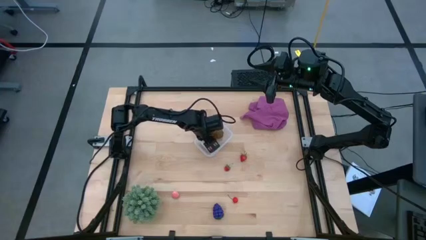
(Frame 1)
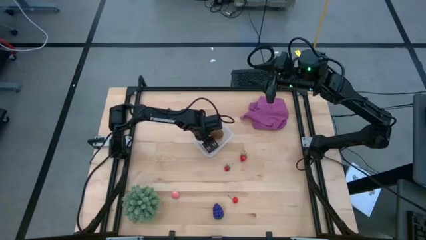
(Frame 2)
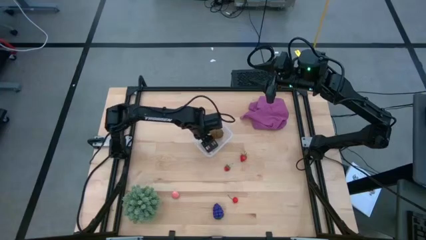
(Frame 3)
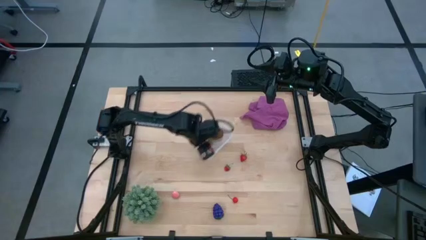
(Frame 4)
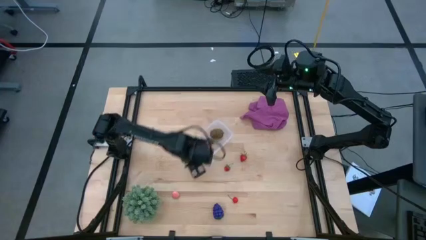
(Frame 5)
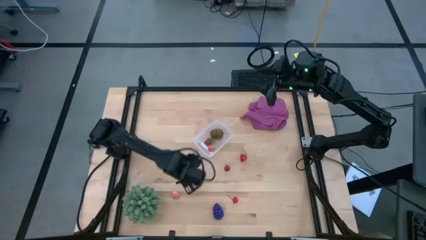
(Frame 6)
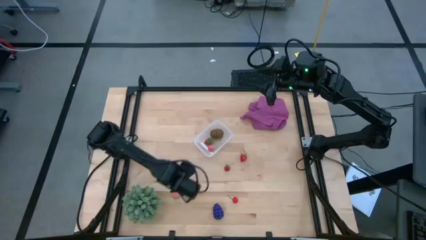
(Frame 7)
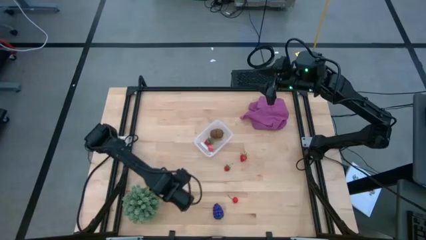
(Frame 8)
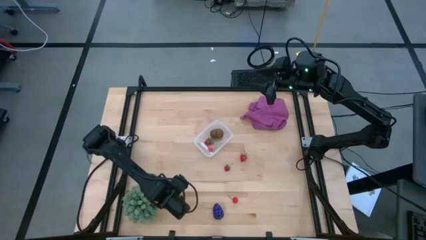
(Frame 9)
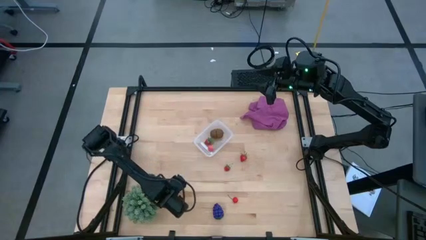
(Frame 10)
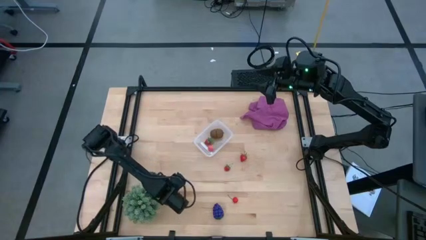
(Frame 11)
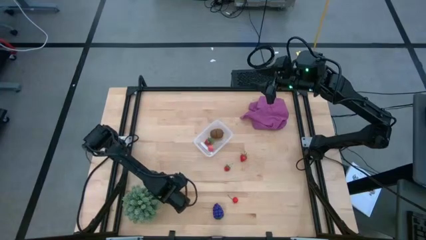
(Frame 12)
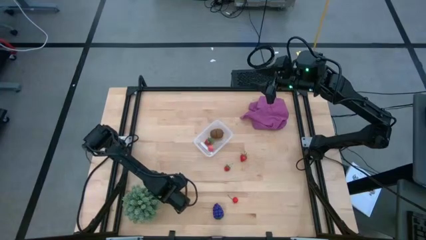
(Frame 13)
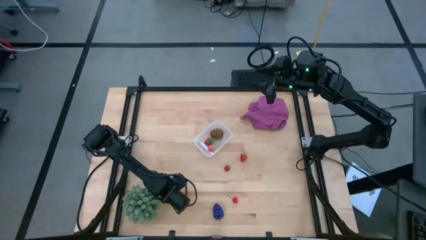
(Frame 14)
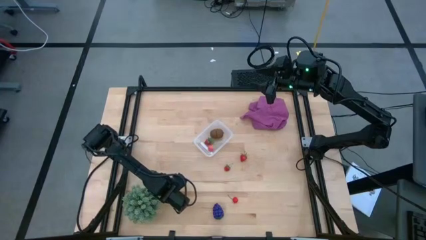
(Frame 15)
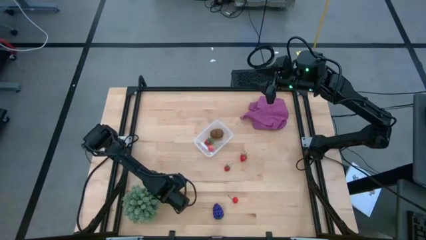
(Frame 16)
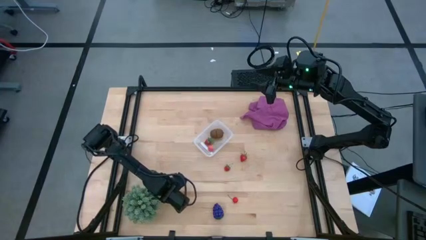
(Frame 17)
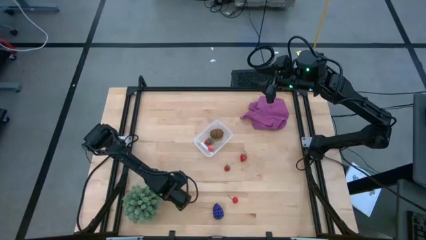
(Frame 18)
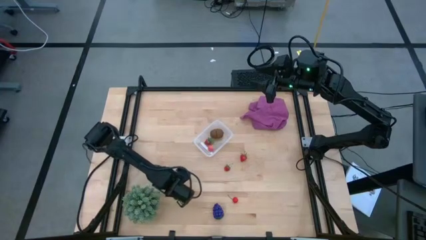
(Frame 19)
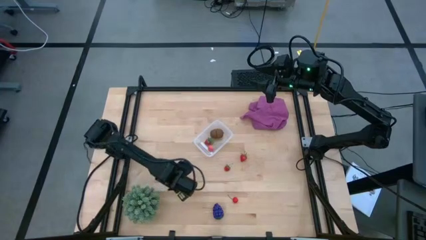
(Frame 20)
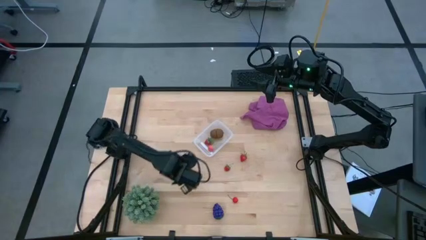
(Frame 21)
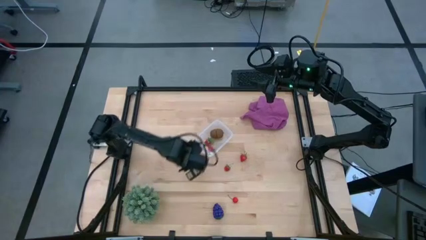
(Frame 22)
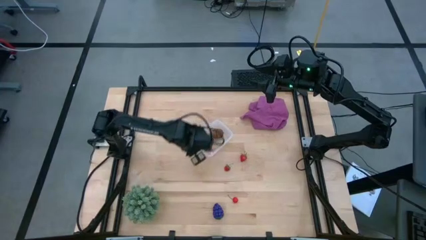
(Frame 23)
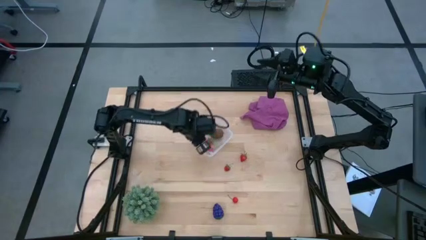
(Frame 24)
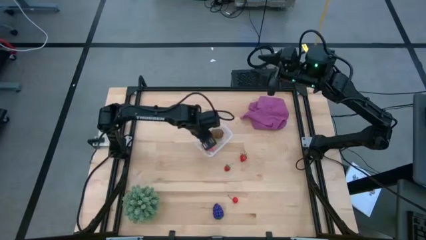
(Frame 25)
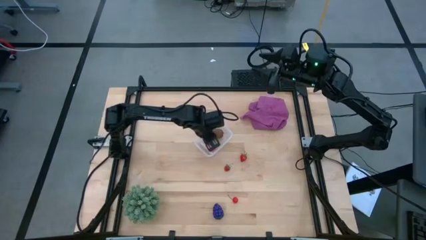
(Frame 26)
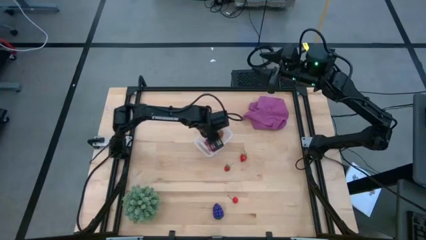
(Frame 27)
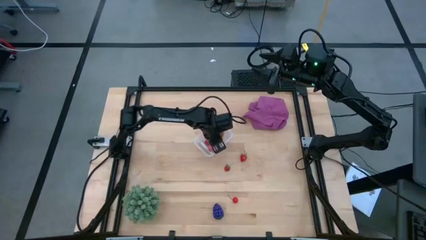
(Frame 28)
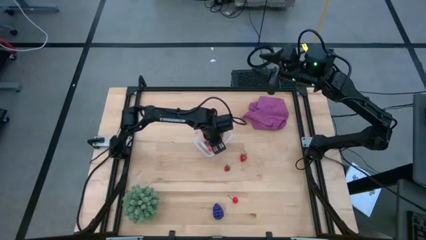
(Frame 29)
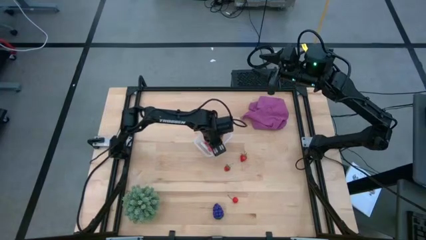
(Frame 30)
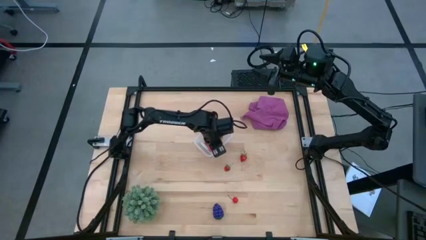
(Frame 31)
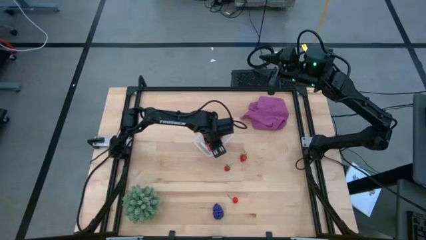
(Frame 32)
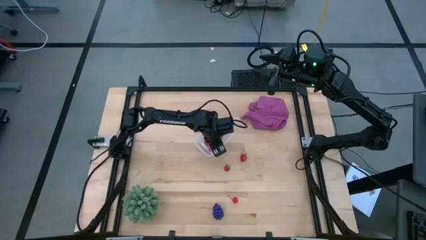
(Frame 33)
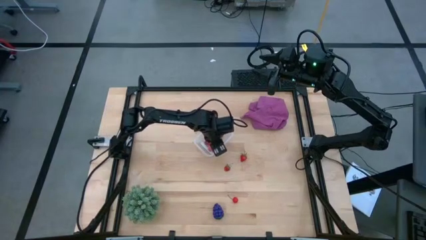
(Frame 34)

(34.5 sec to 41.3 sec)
Task: Pick and placing Produce into tupperware
Put the peach into the transparent bin

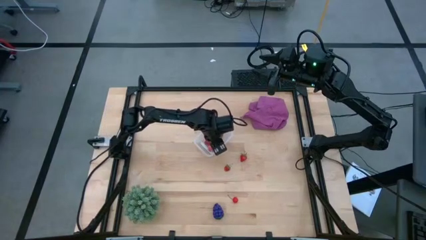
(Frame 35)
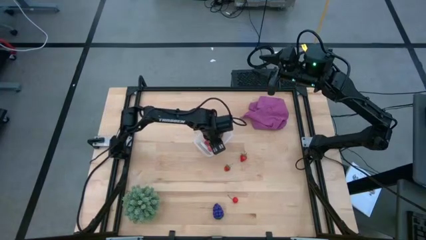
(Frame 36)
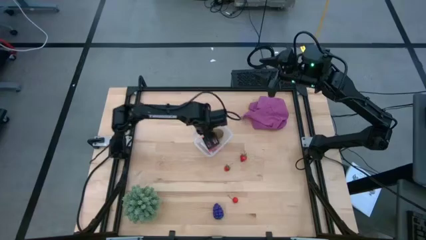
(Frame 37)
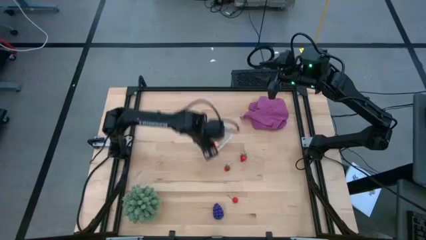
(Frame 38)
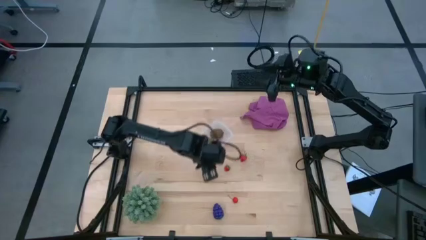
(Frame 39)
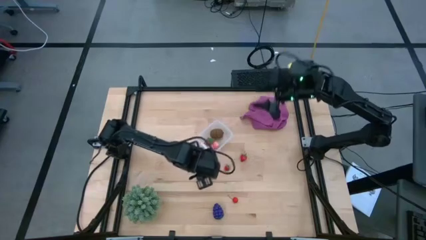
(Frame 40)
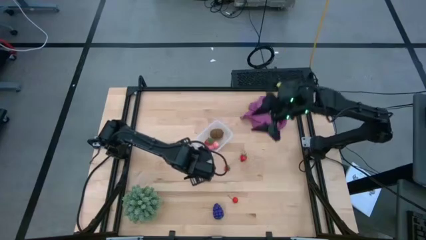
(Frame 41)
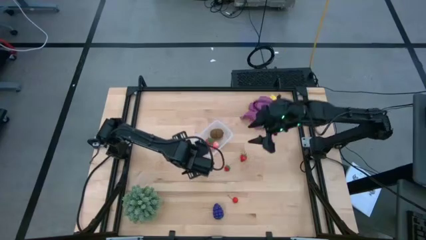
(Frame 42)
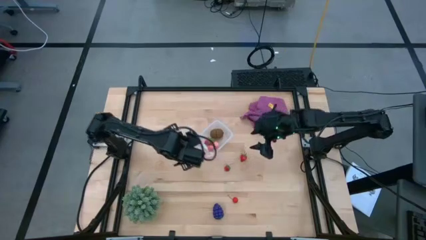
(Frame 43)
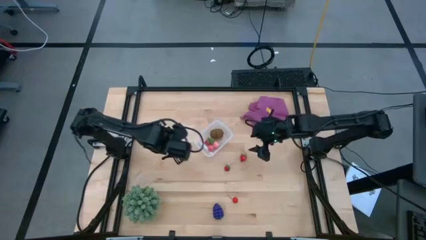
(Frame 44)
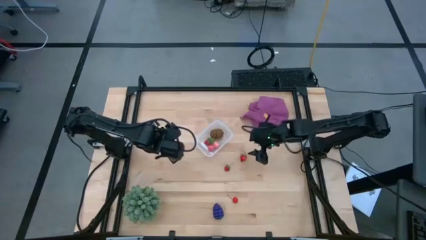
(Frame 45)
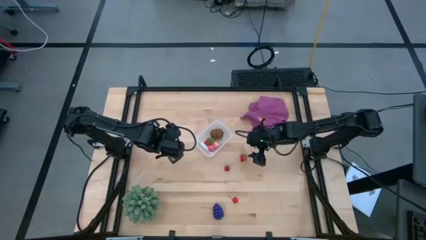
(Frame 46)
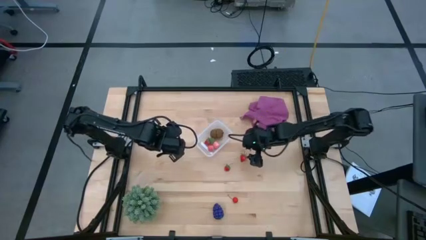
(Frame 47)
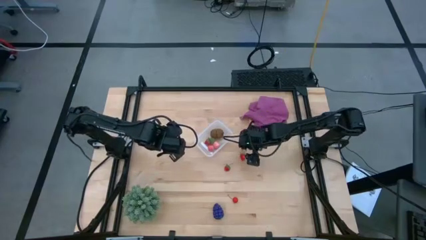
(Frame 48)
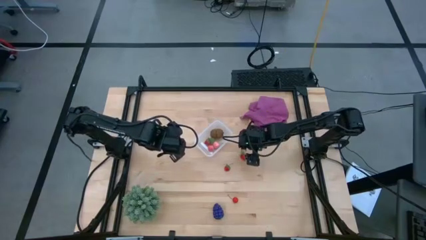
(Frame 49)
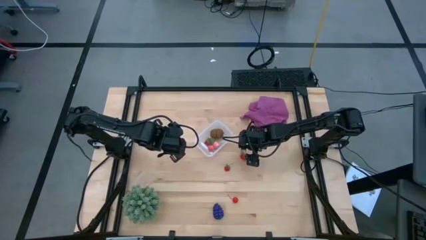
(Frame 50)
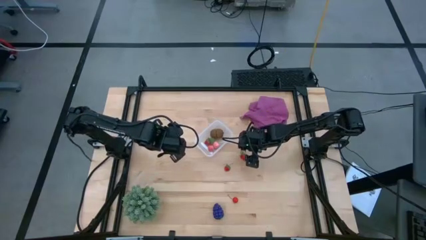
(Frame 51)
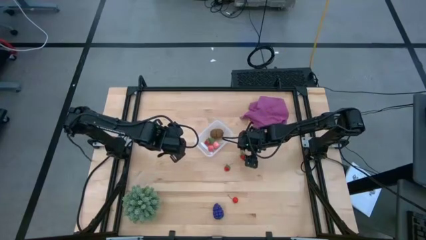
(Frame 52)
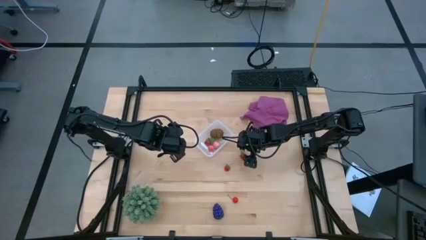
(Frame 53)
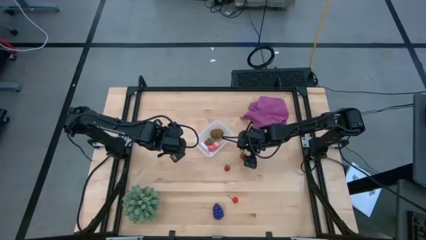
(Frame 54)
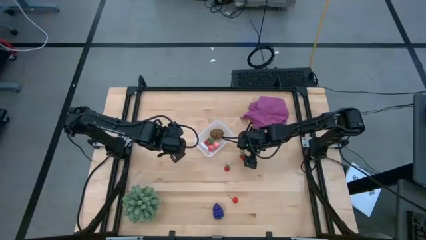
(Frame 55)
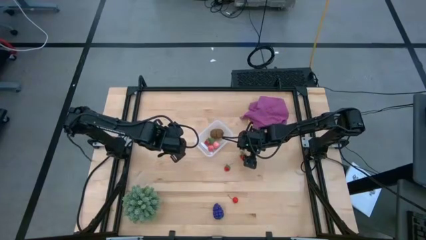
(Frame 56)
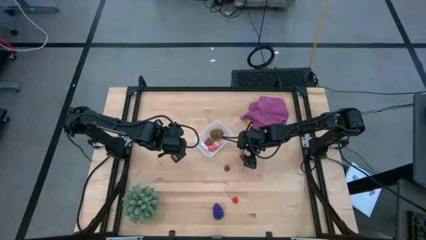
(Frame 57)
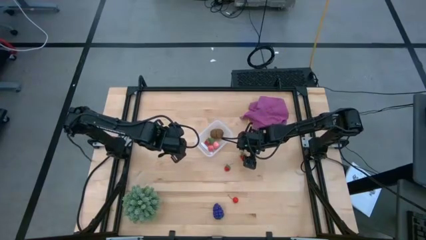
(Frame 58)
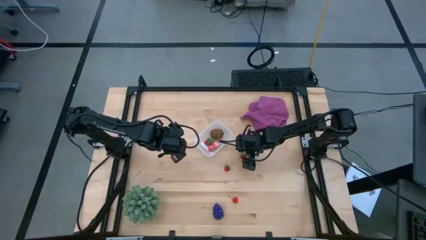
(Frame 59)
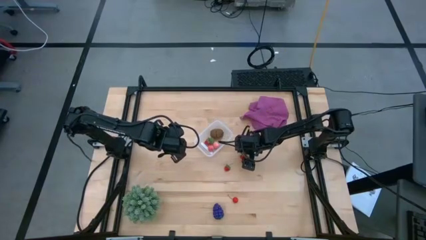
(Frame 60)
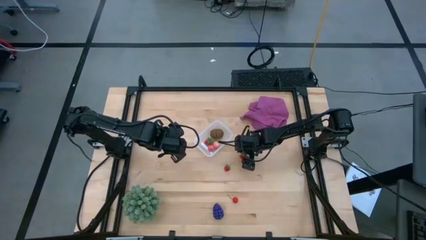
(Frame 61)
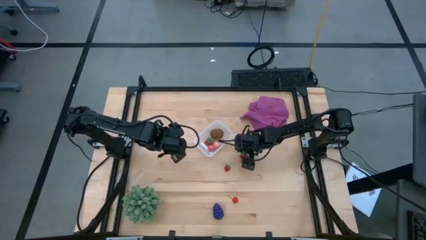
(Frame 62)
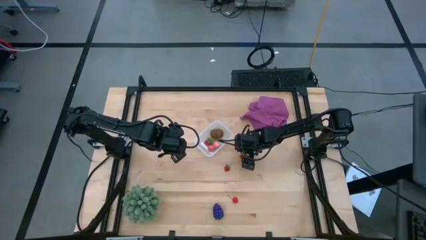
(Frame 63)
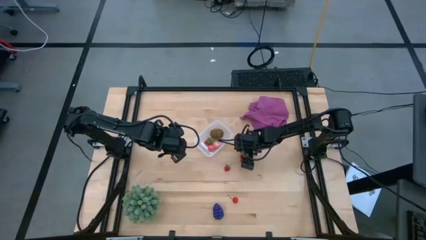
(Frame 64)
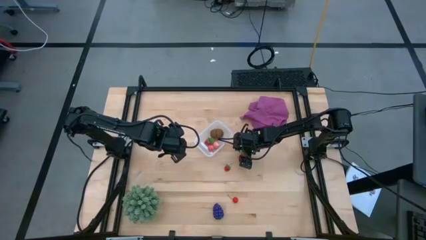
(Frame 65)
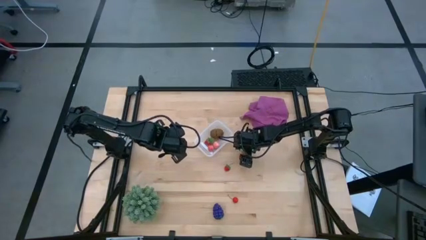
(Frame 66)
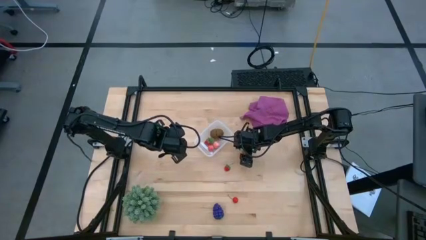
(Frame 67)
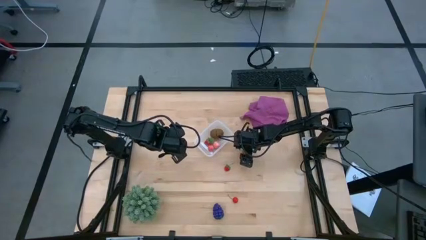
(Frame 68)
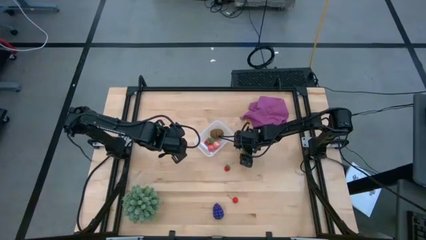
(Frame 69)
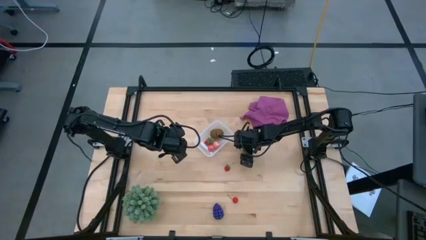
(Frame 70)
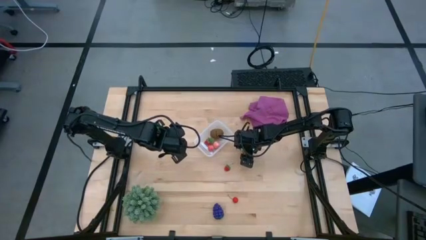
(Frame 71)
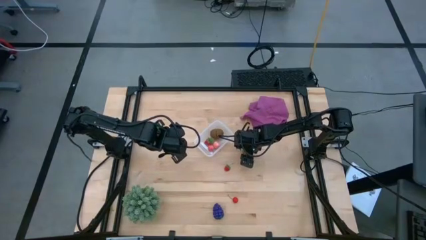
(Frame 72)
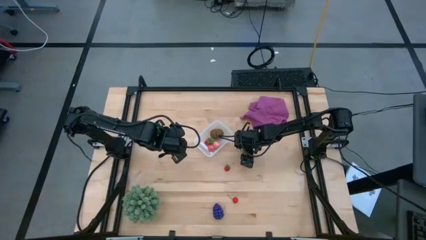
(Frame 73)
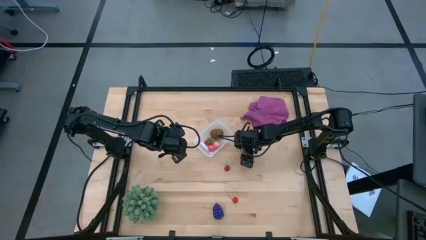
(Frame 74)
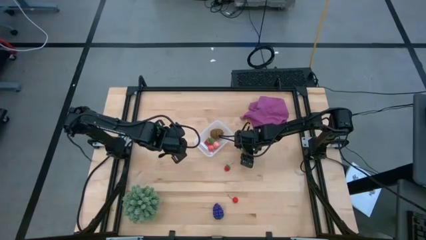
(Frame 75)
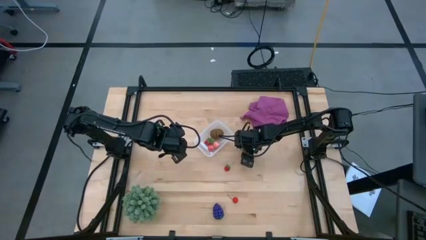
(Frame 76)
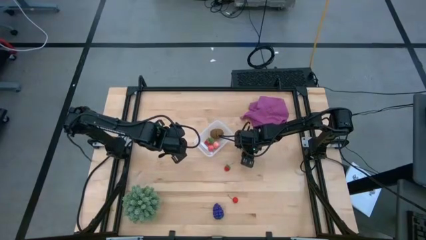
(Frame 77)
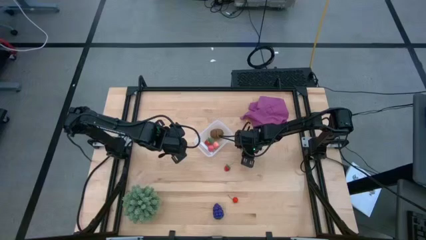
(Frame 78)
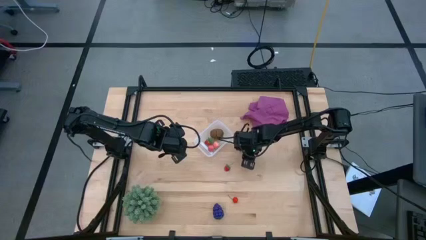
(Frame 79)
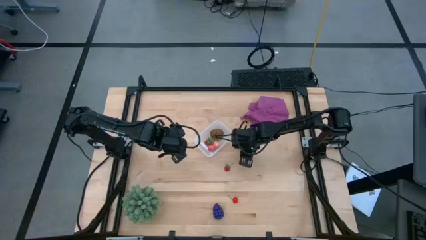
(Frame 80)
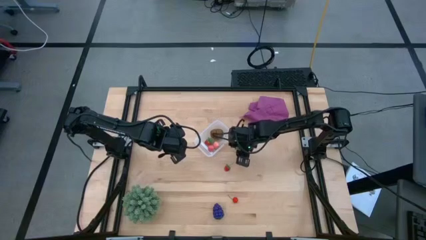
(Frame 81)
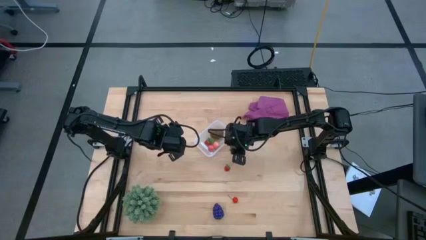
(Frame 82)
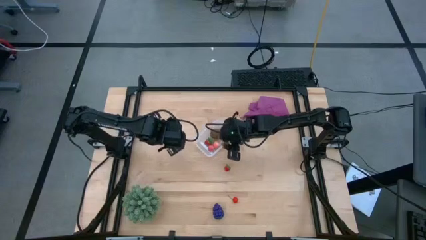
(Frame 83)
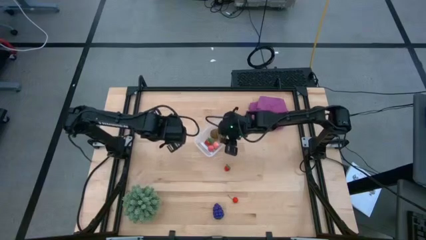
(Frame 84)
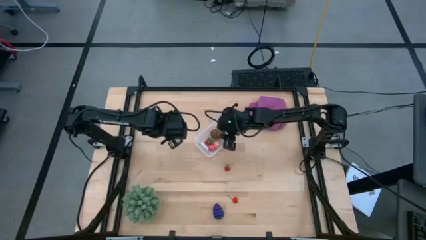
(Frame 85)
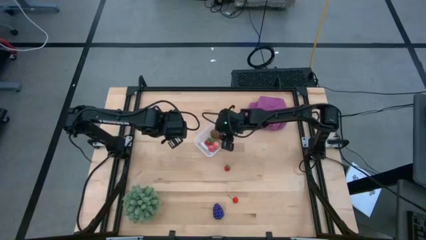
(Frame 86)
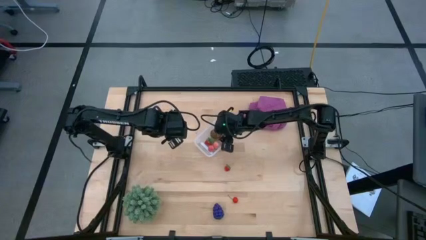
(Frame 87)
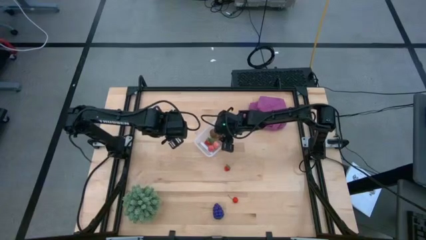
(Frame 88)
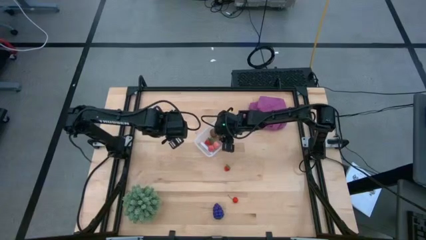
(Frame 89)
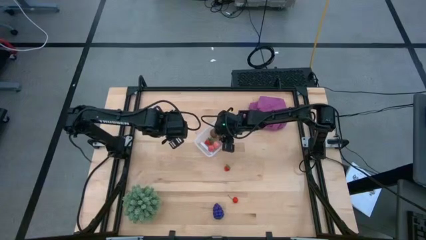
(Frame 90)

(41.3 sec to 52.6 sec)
Put the right strawberry into the transparent bin
